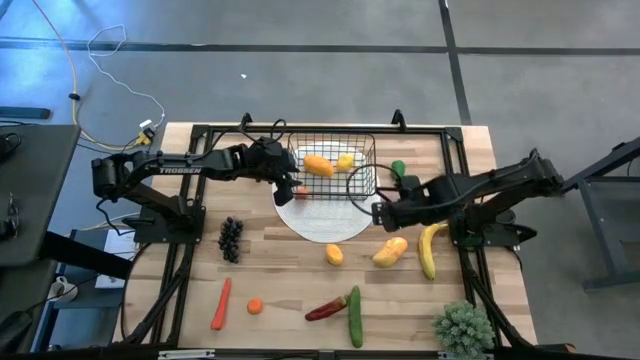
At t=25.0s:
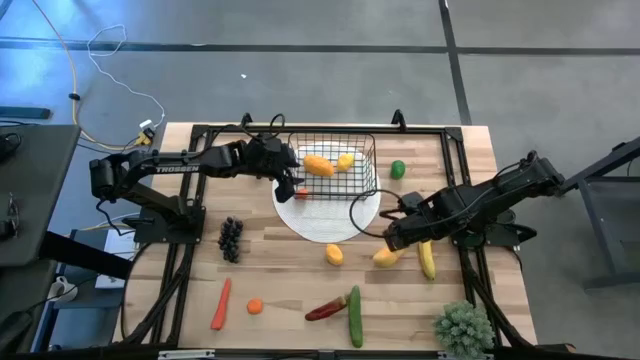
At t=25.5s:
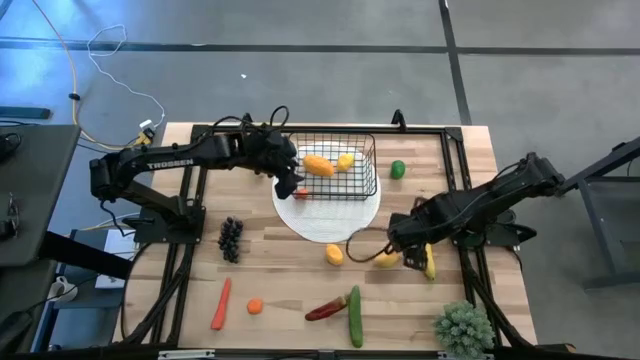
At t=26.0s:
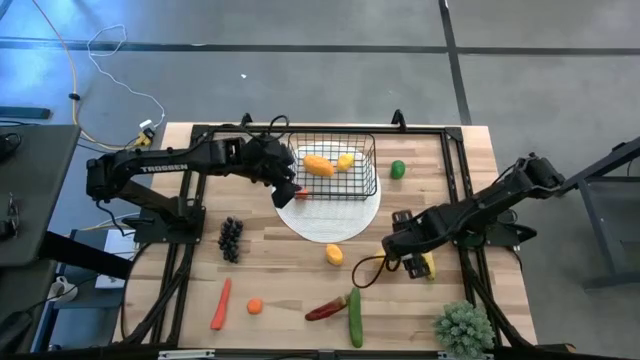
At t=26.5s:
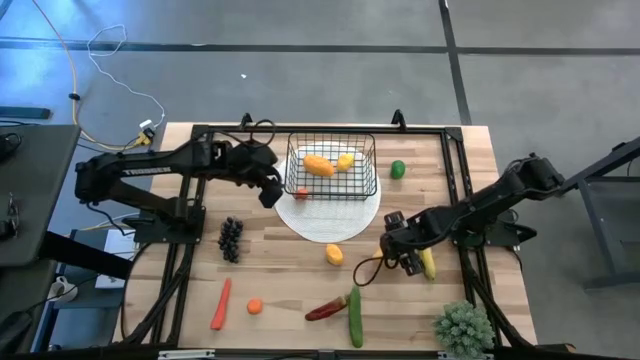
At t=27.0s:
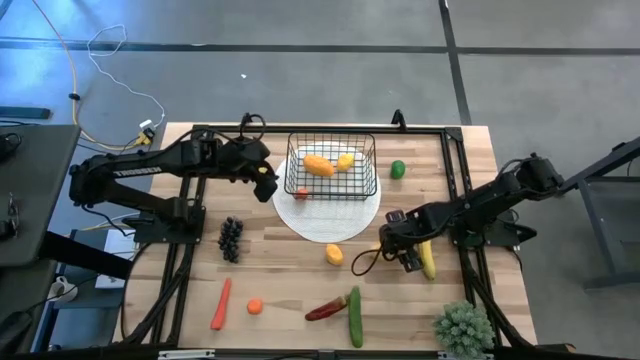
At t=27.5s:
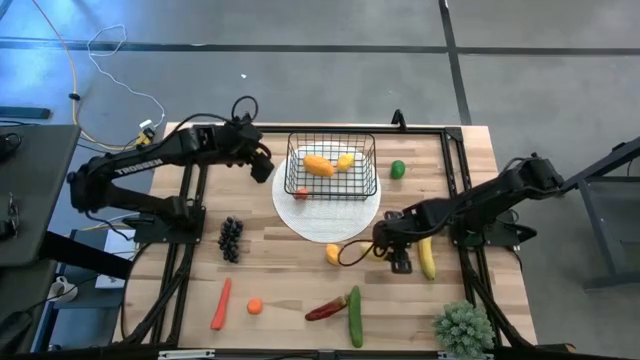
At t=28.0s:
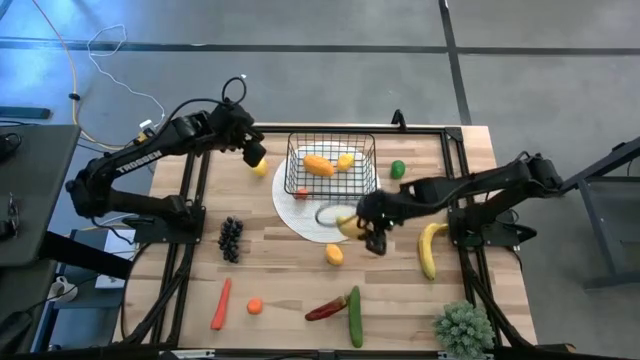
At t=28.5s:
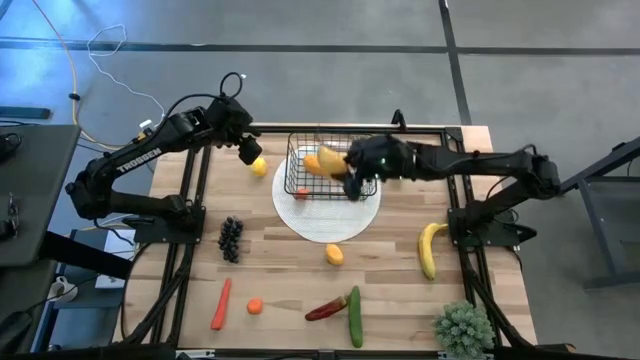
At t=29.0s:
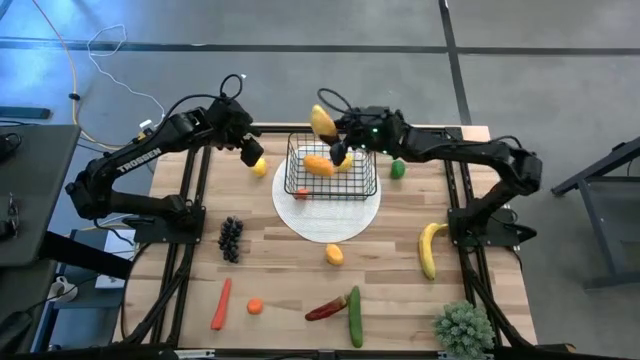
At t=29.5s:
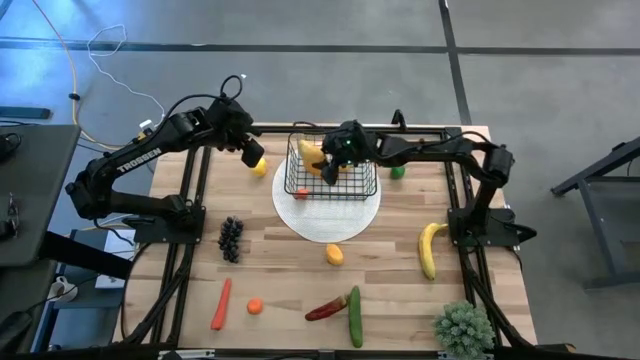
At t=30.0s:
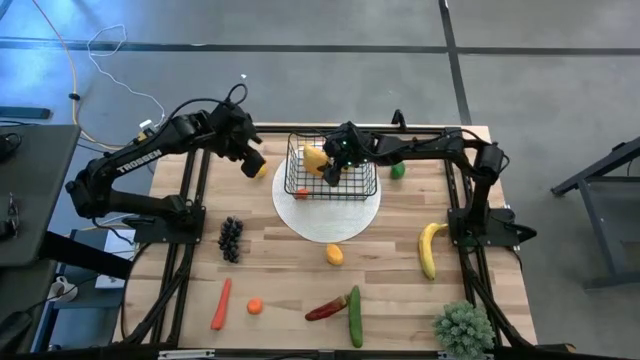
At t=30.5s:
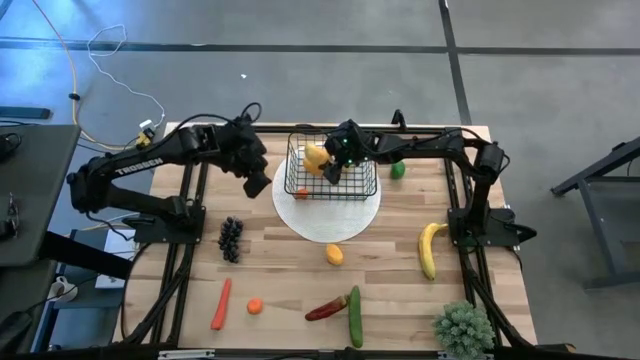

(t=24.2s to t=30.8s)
Task: Build produce basket
Put the yellow mango into the black wire basket

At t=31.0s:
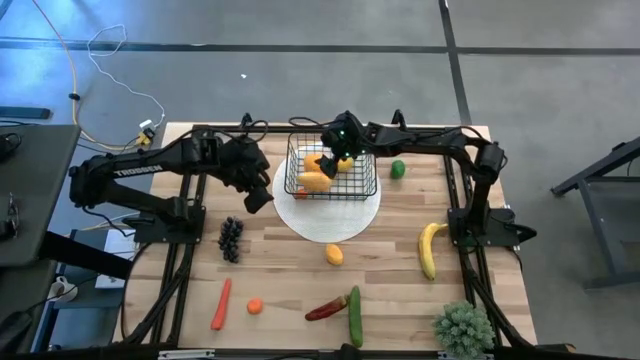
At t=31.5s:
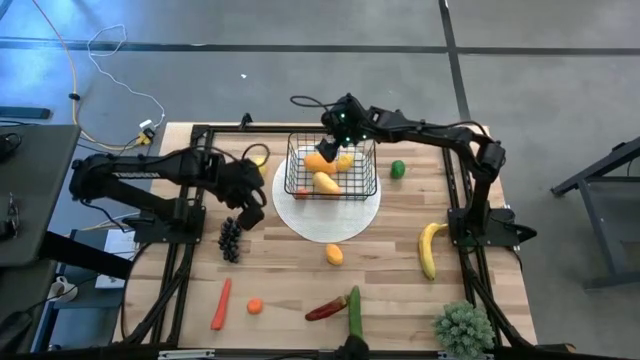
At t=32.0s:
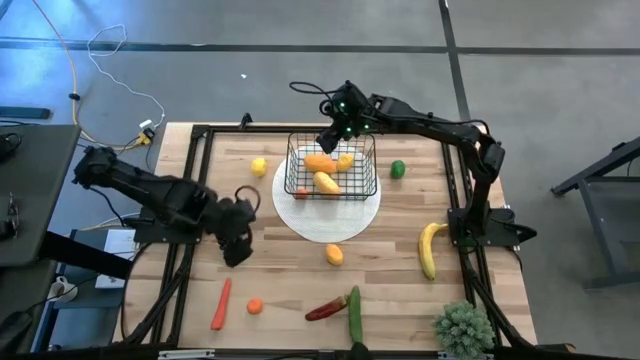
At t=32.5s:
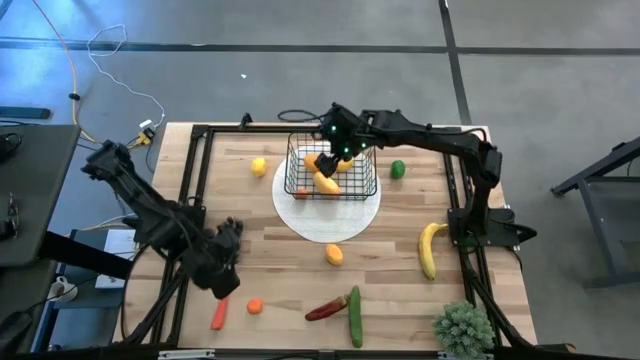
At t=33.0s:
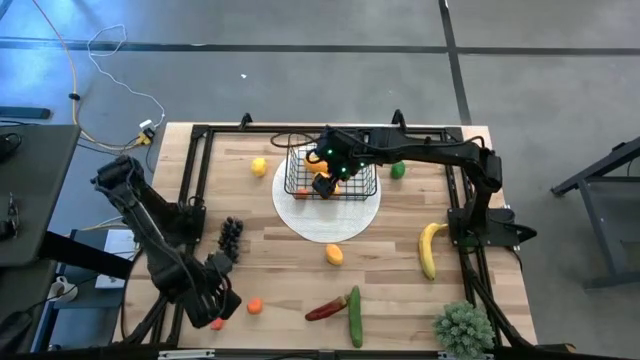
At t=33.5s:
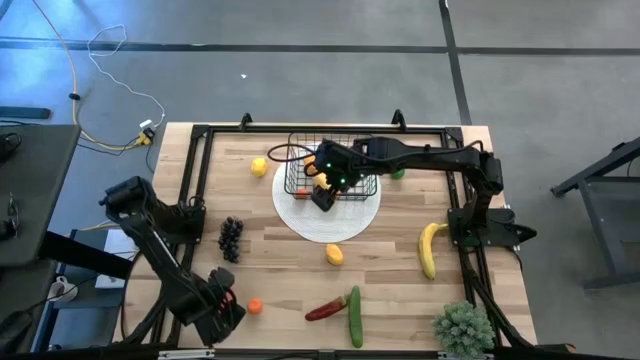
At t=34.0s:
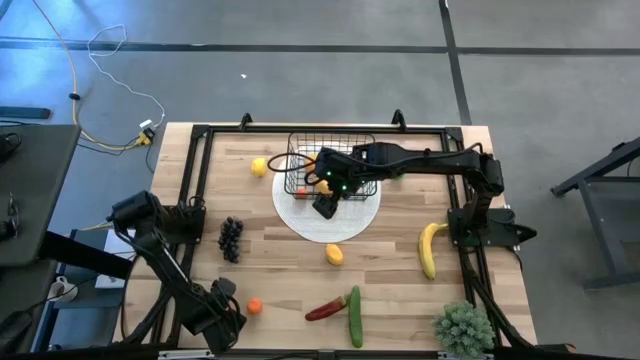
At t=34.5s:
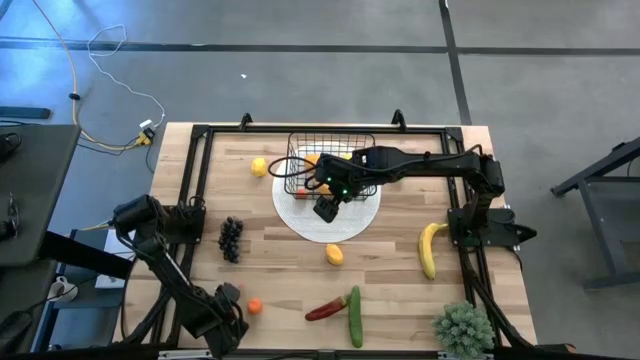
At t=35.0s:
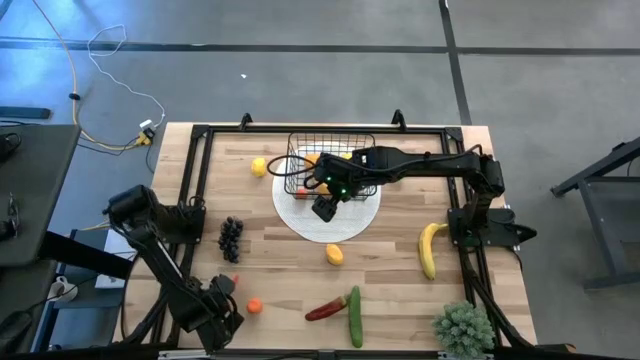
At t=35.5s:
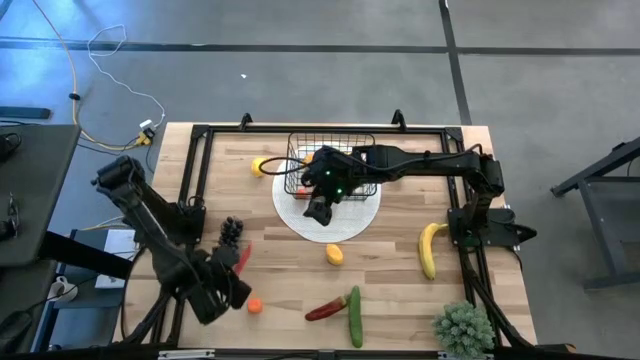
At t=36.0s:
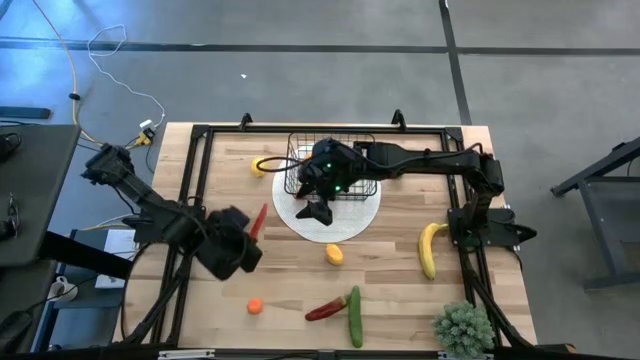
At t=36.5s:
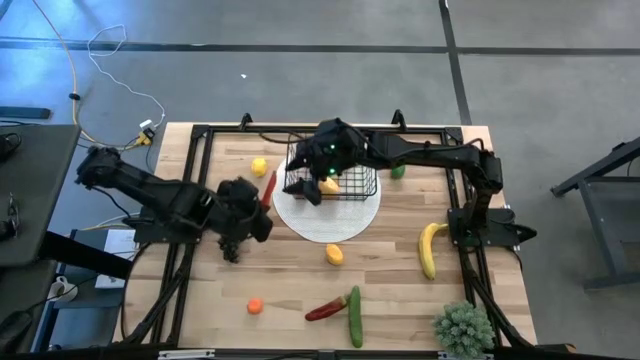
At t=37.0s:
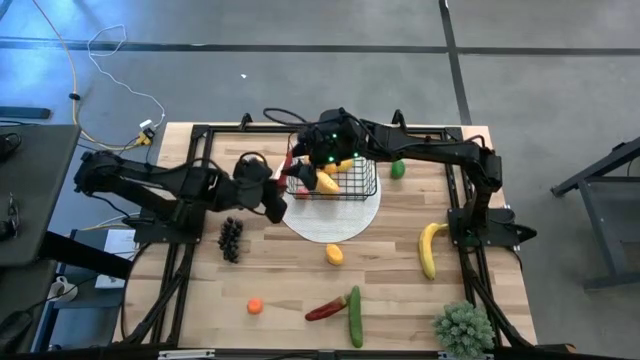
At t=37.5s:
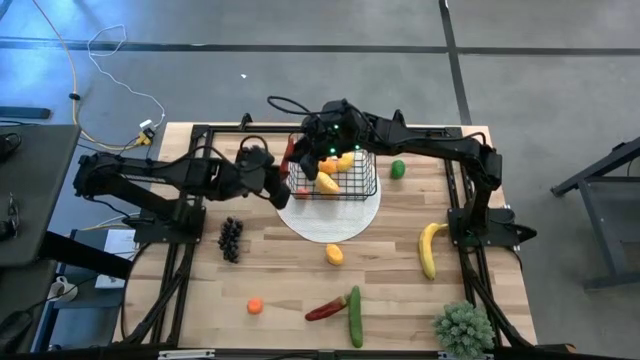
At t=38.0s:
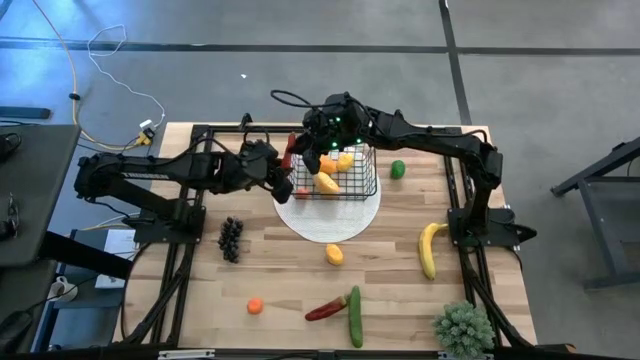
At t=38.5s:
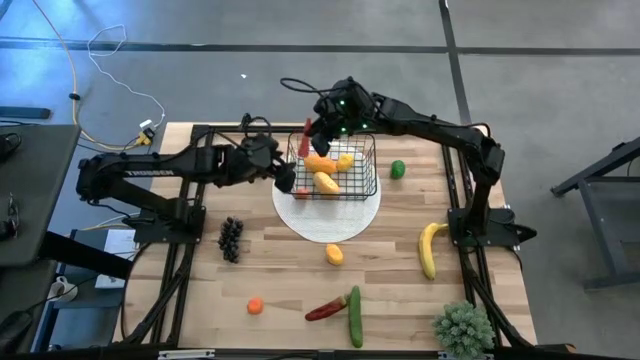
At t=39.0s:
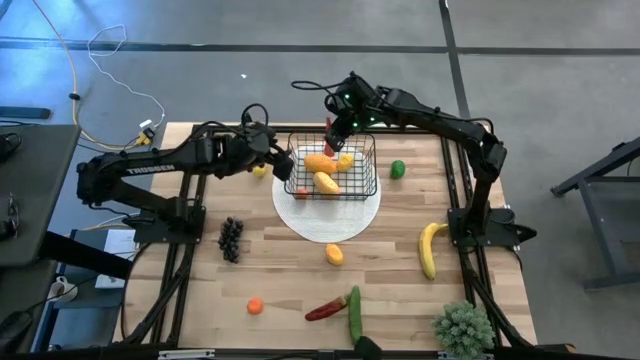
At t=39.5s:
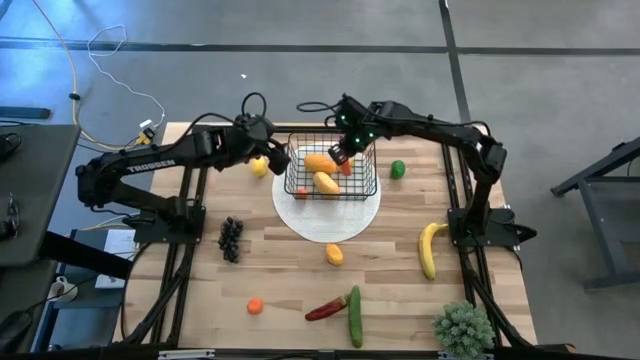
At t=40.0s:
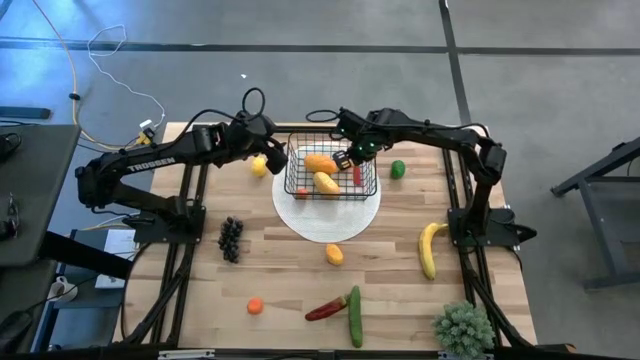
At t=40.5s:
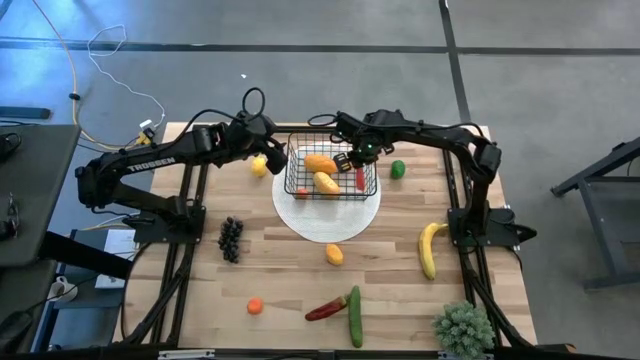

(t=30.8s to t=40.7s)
Put the orange carrot into the black wire basket

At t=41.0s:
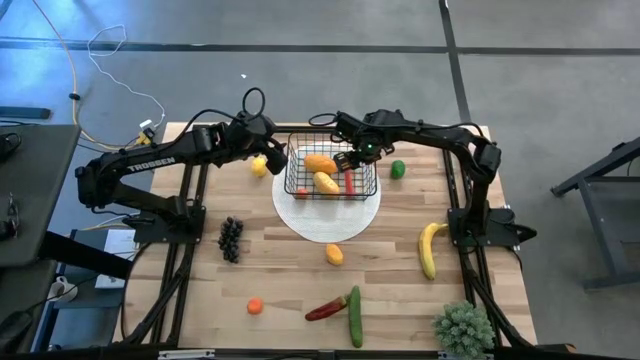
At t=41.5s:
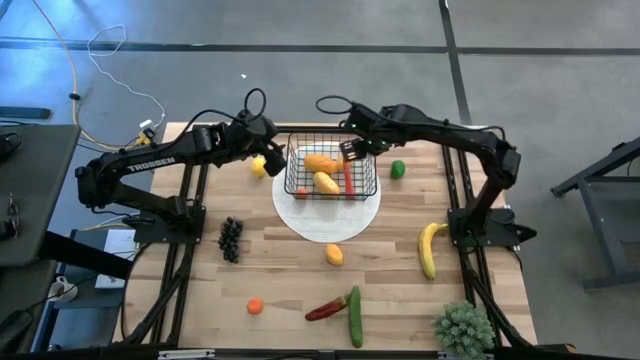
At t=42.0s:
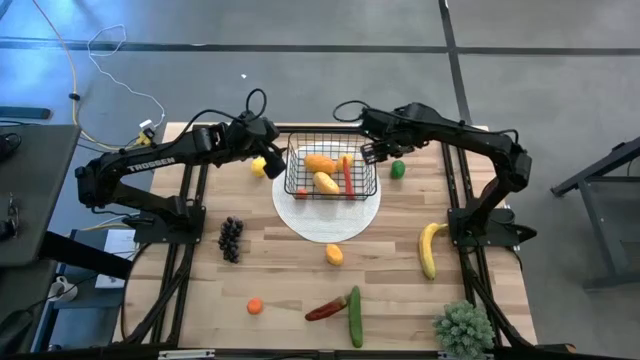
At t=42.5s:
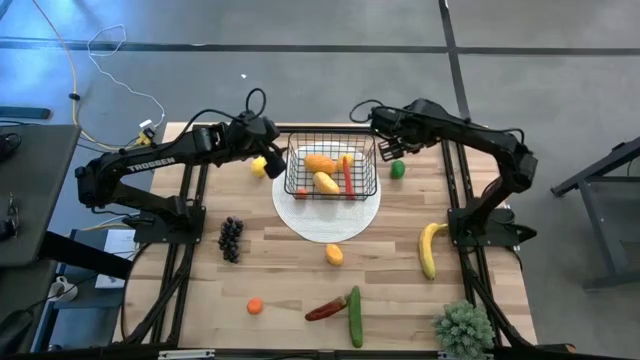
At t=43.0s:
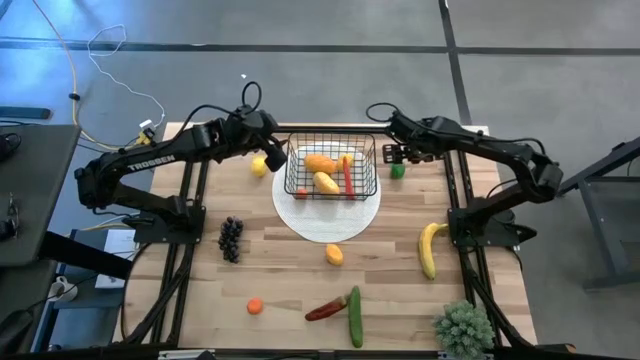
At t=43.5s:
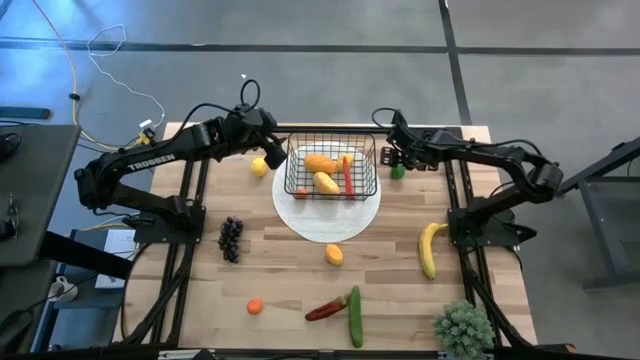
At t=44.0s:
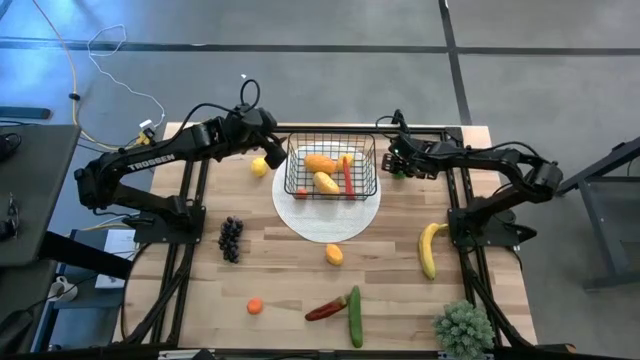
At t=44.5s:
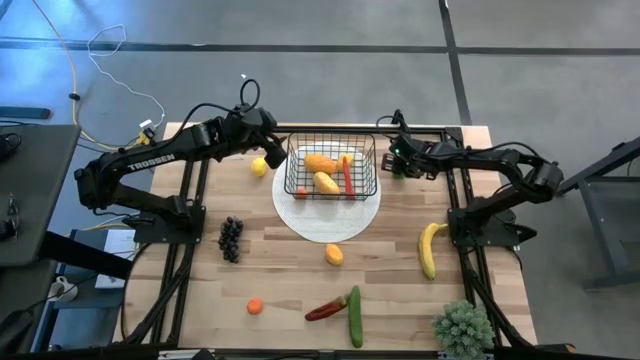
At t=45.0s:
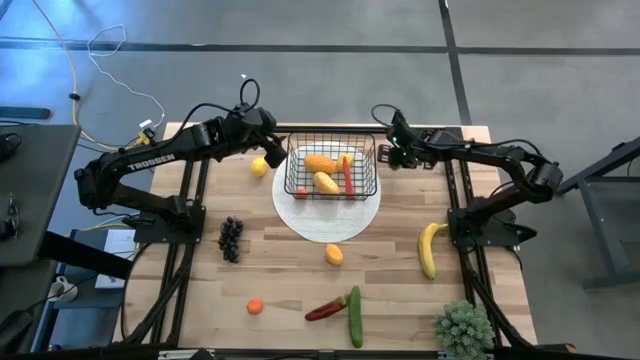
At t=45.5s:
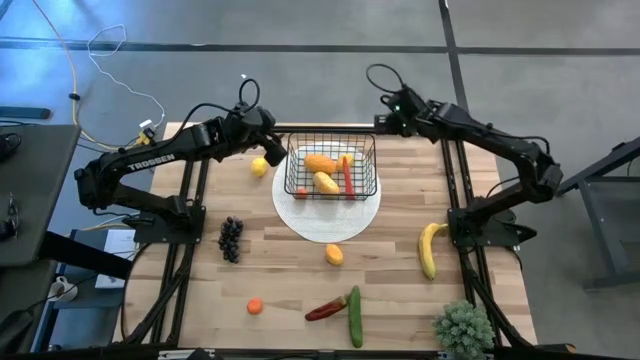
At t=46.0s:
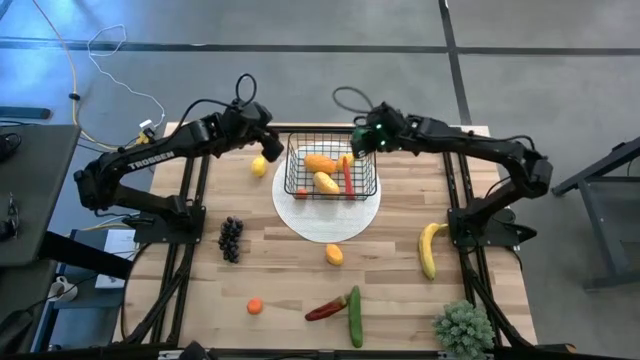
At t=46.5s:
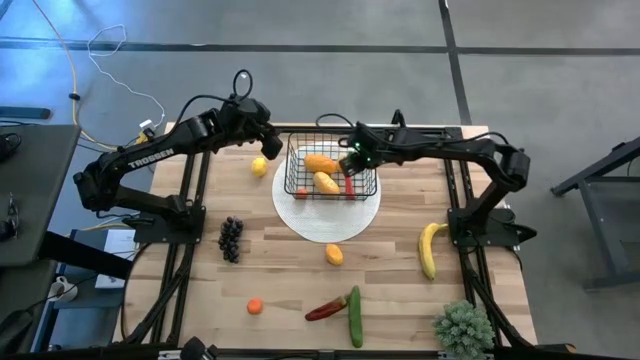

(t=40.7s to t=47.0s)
Put the green lime into the black wire basket
